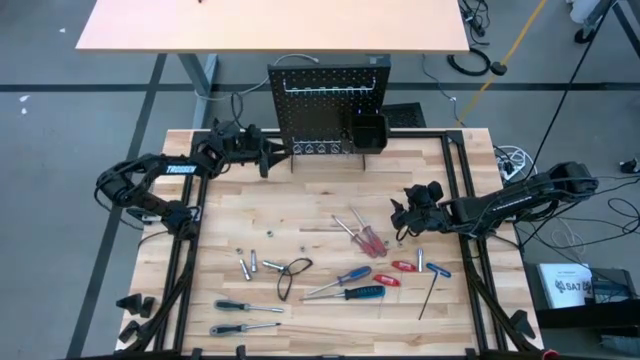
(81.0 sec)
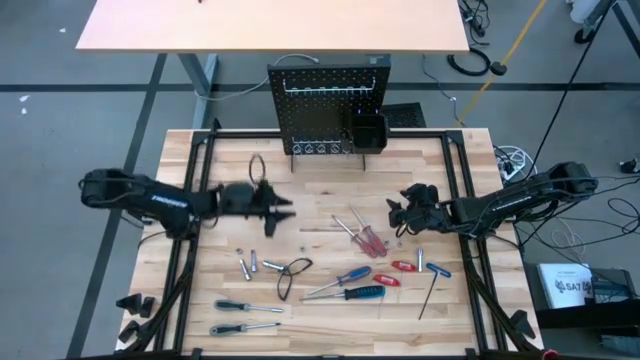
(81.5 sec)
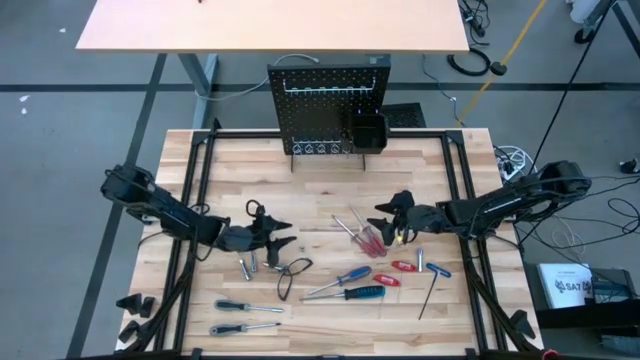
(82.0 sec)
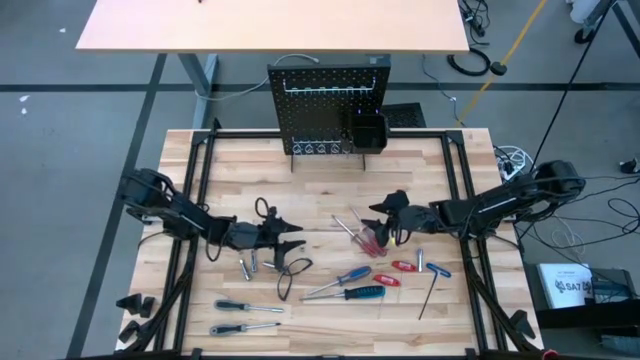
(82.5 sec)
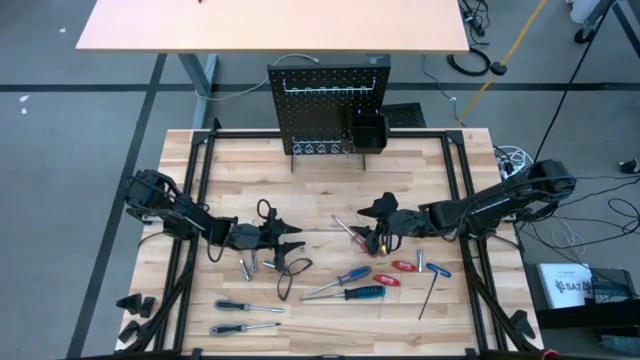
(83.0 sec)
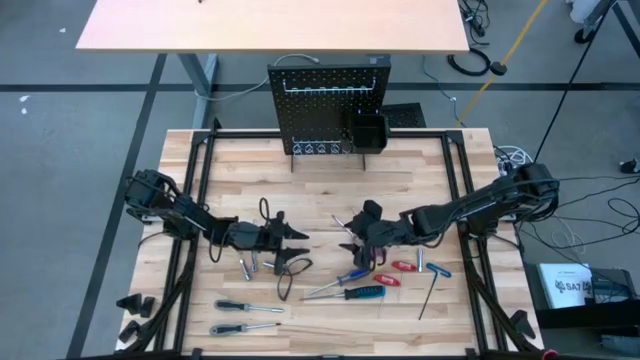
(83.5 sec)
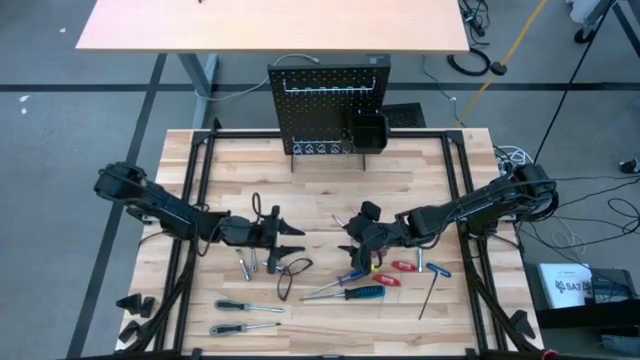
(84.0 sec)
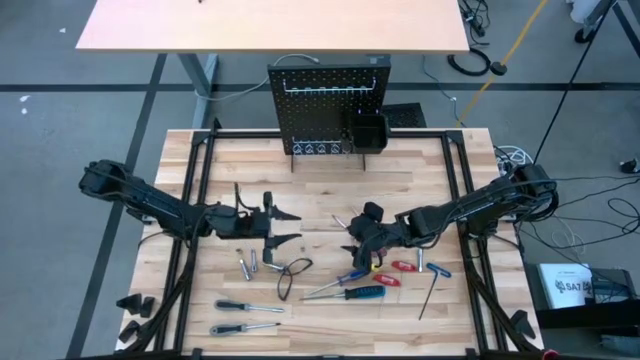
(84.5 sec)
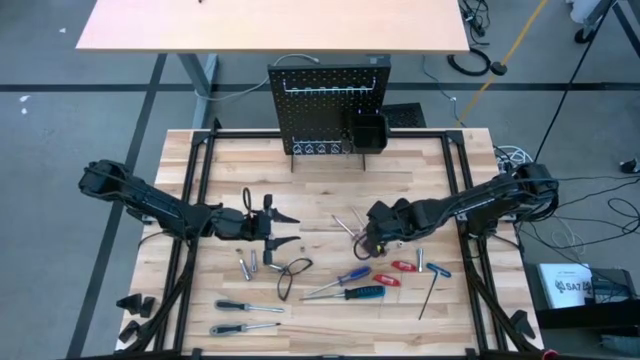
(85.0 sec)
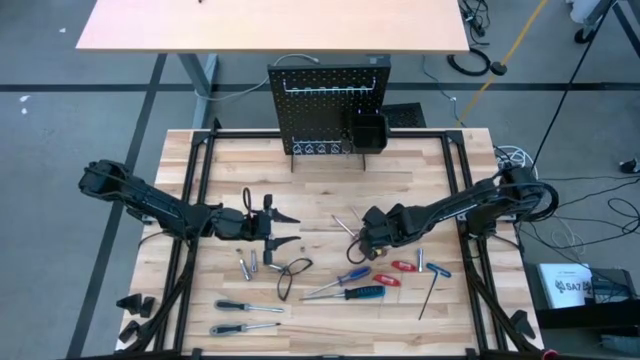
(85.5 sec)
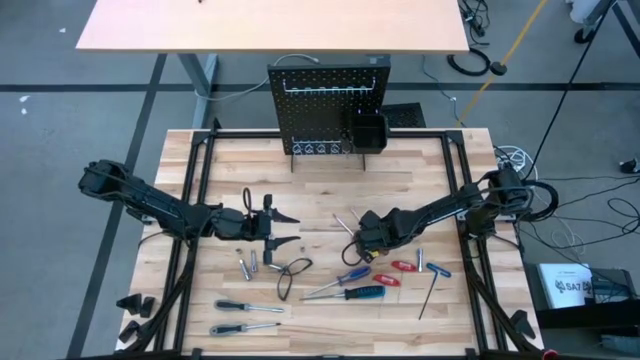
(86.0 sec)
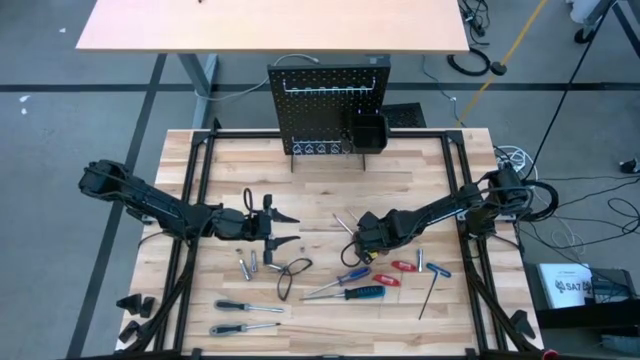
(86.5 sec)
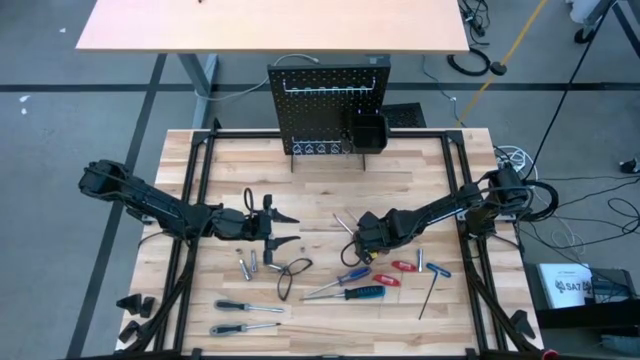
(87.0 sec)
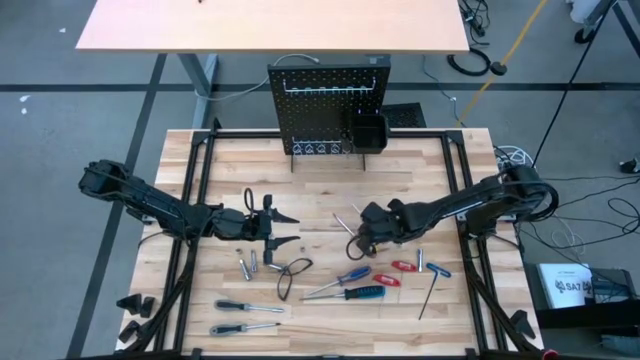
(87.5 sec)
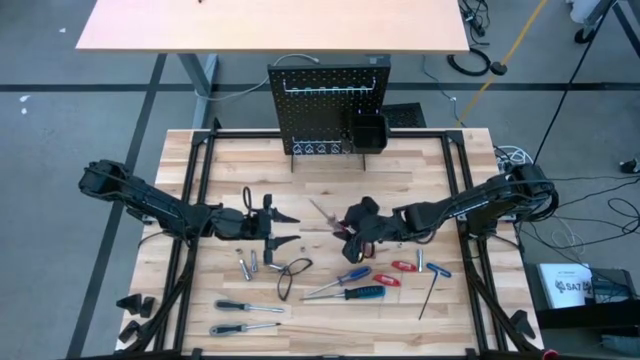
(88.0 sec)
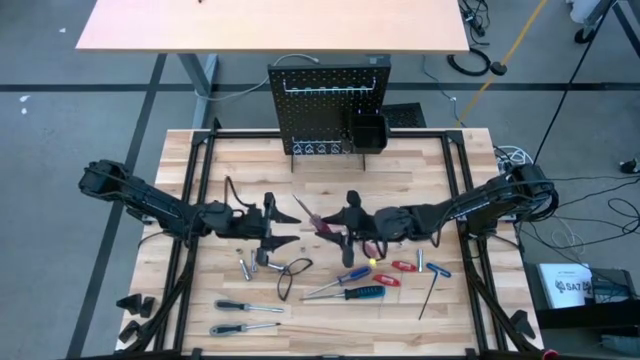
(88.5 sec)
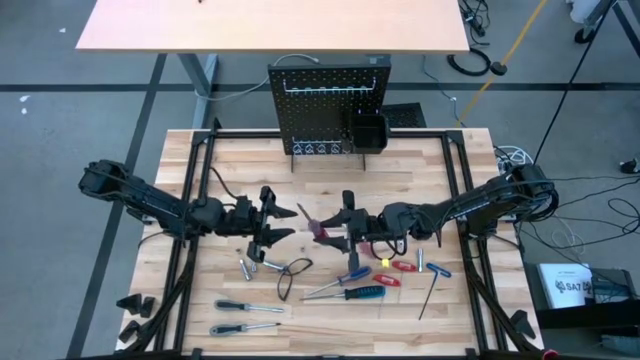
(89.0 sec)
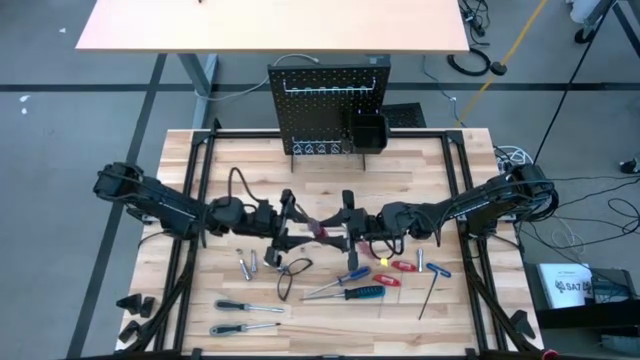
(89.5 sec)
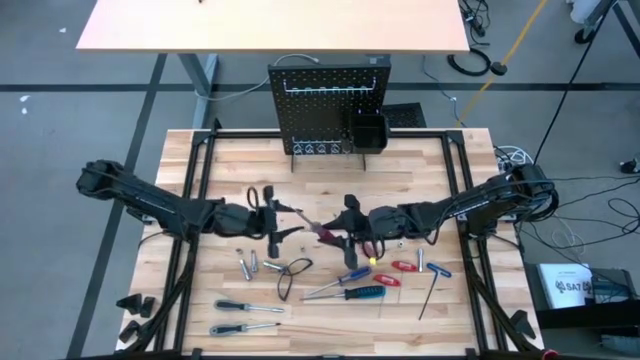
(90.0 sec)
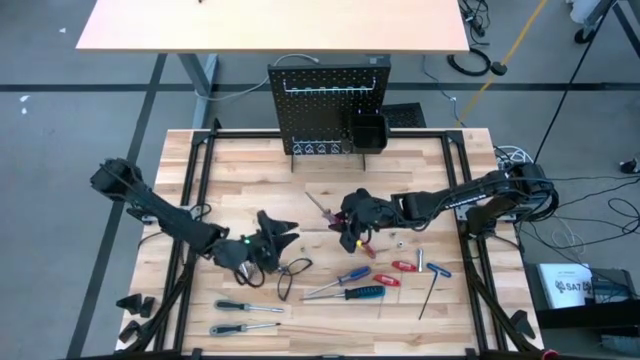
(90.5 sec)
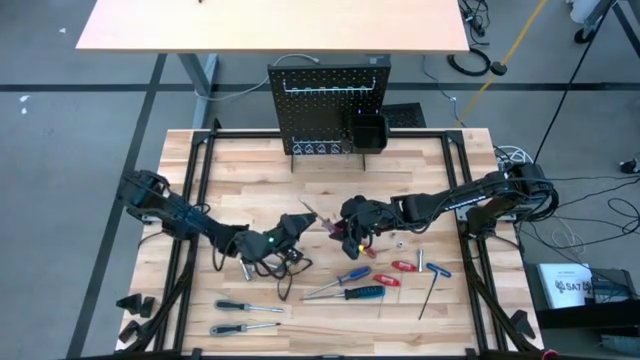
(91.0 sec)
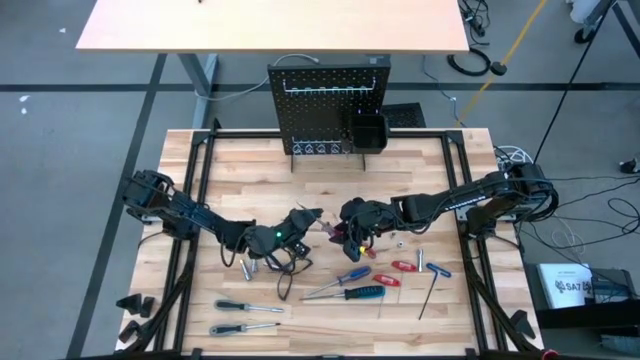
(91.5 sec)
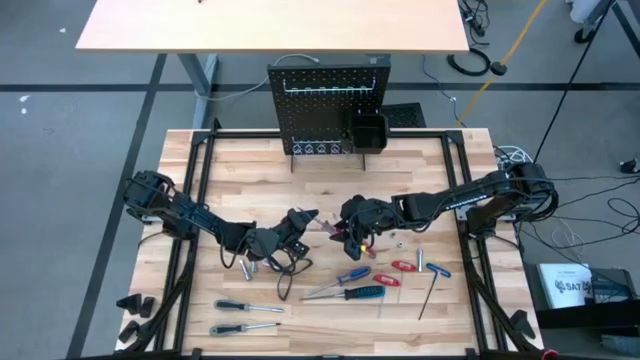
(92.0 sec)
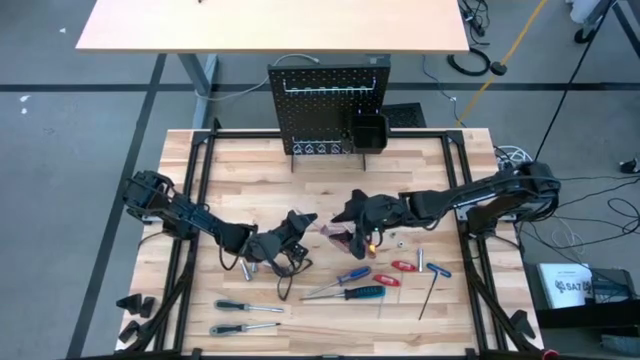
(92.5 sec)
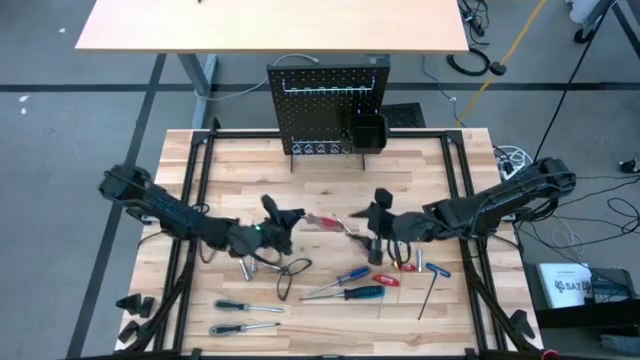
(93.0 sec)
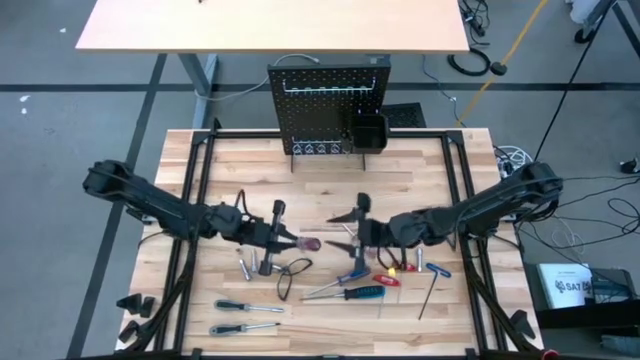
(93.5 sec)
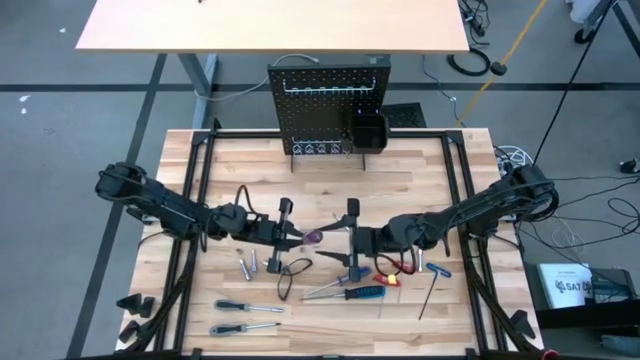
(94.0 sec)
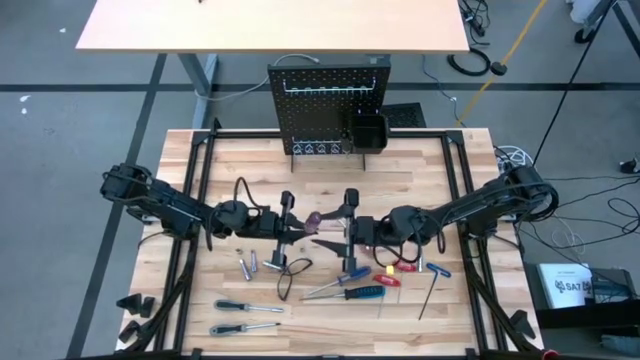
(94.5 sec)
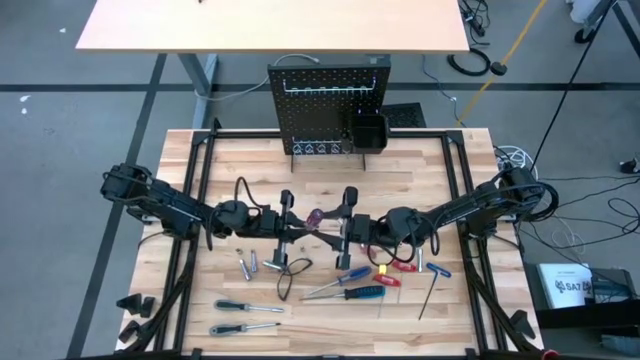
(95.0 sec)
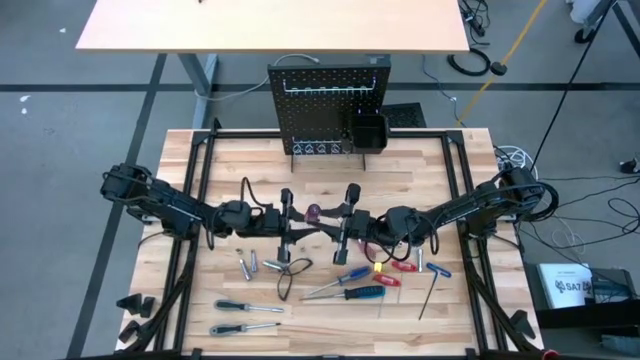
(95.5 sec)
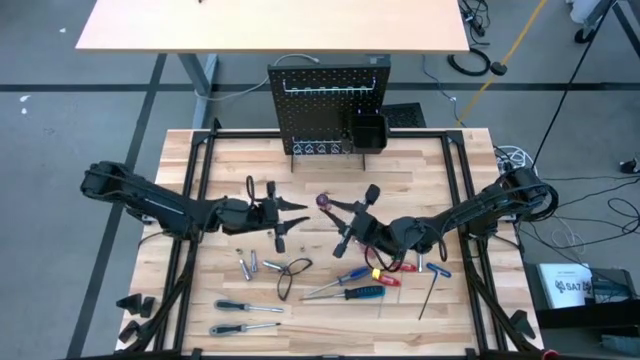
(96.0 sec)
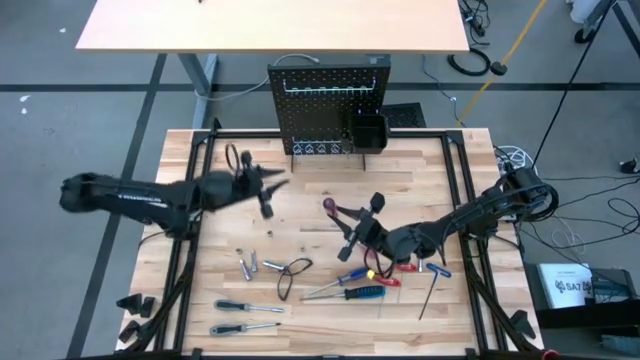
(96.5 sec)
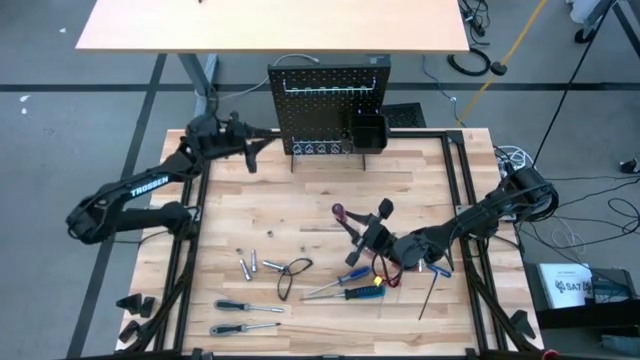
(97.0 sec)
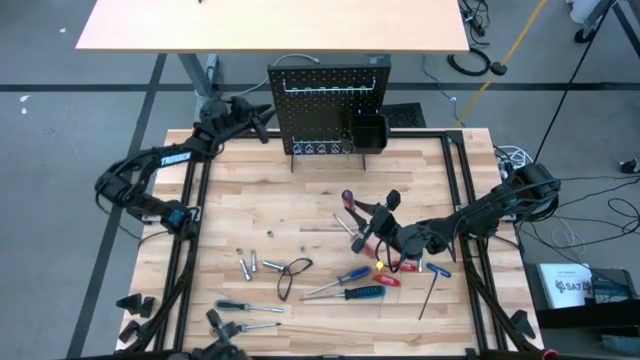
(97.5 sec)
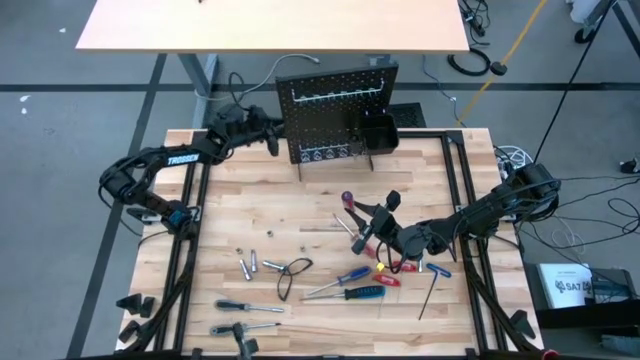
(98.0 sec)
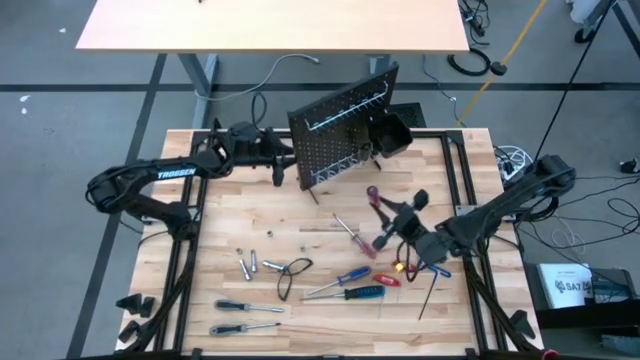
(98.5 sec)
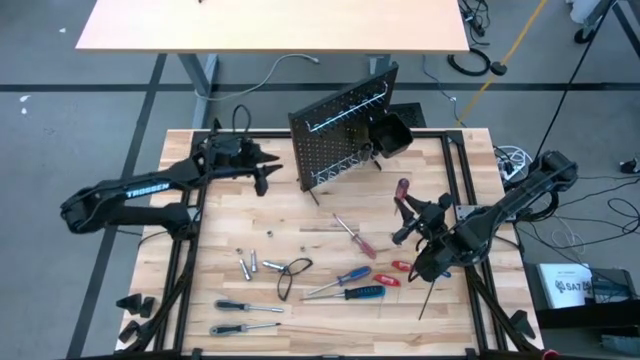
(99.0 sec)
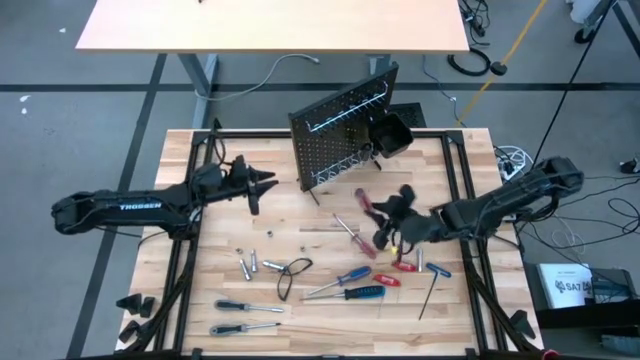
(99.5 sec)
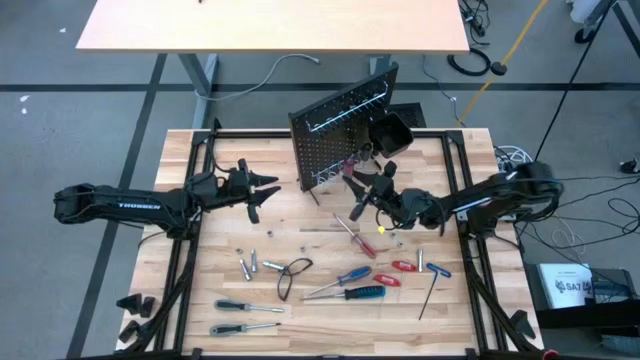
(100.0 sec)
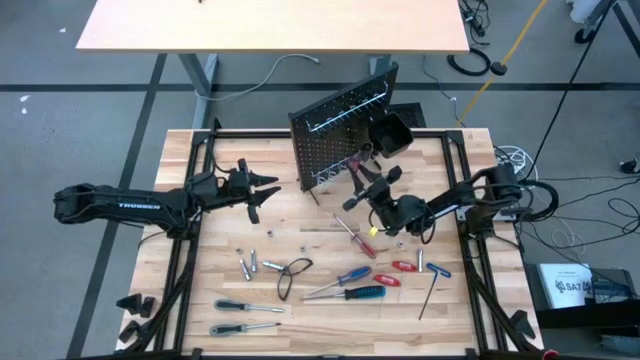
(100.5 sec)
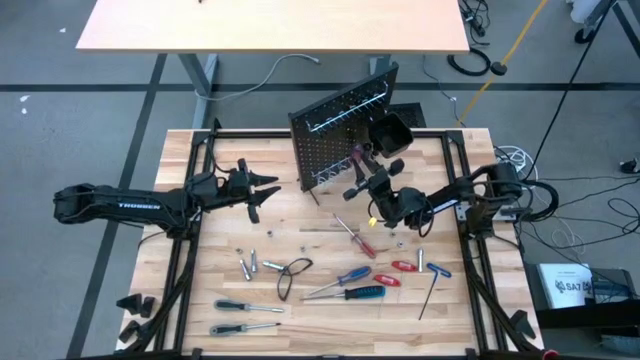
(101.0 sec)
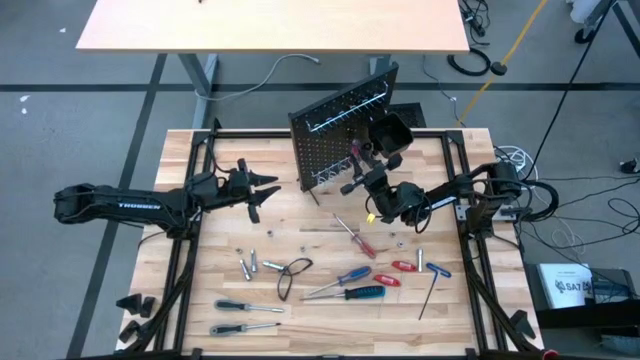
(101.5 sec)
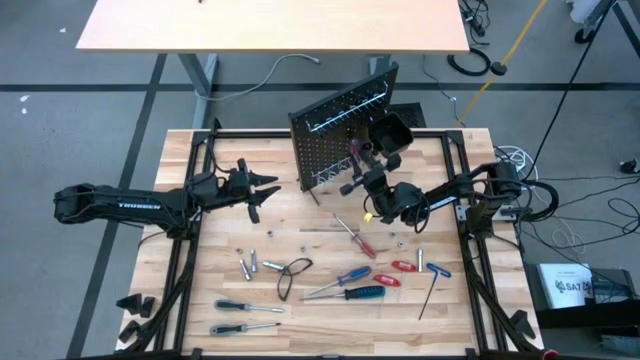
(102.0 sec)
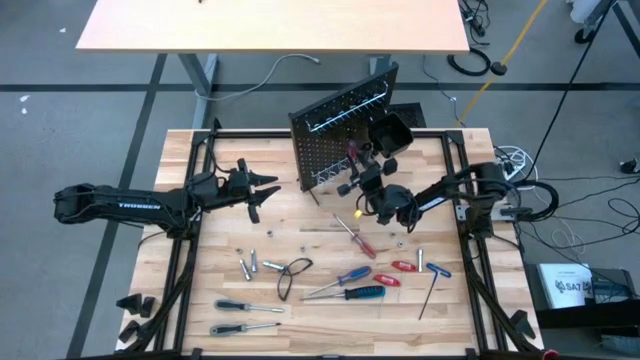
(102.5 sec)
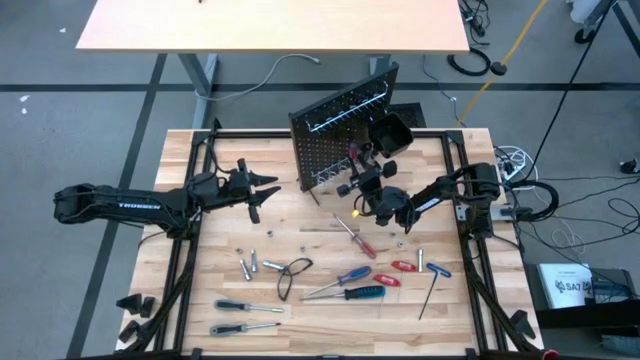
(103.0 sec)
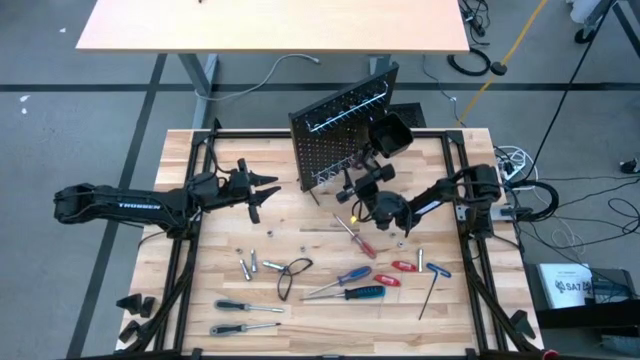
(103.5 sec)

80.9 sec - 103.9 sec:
Task: Hang tools onto peg board
Hang the top red screwdriver on the peg board
